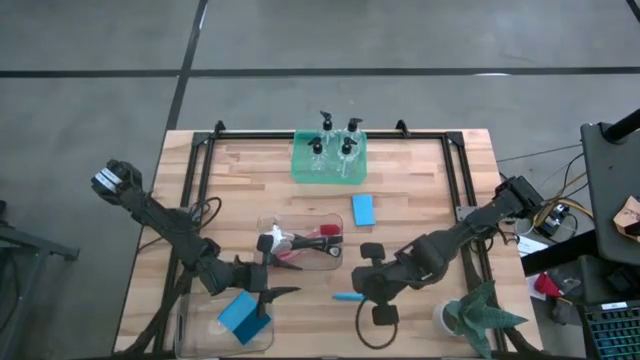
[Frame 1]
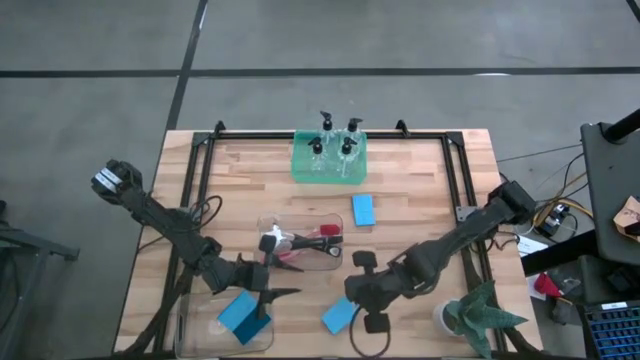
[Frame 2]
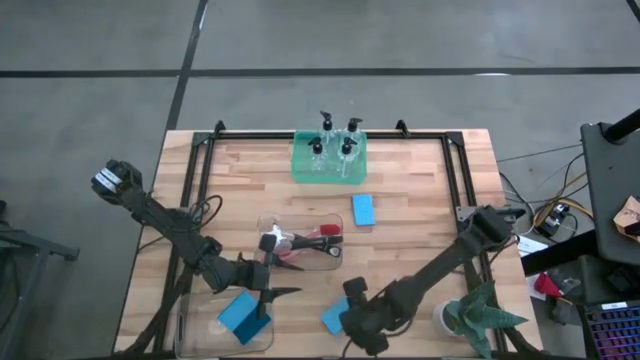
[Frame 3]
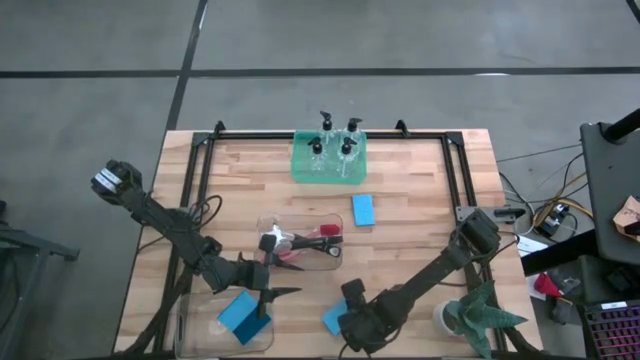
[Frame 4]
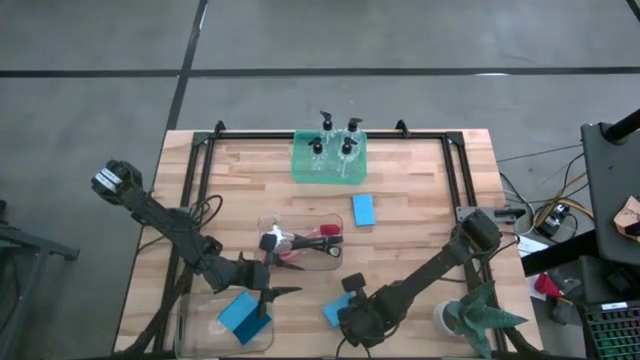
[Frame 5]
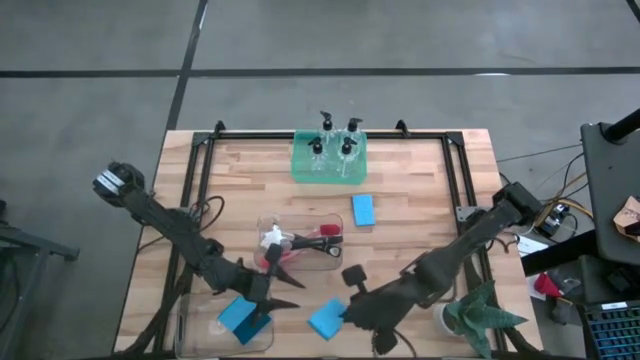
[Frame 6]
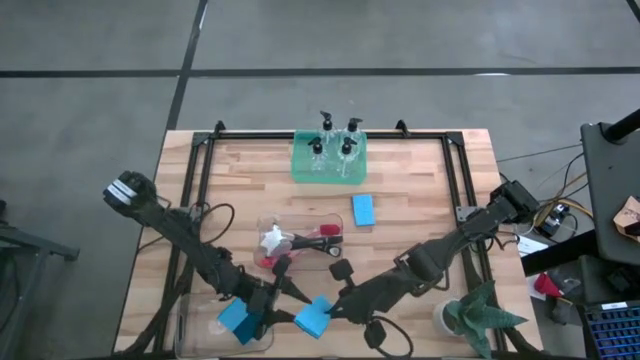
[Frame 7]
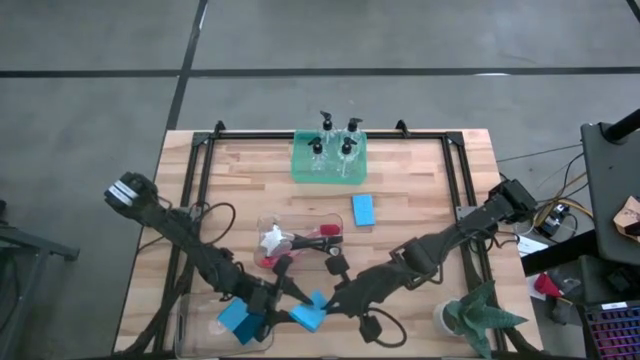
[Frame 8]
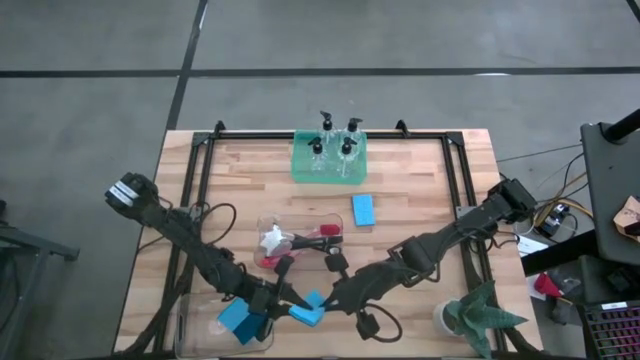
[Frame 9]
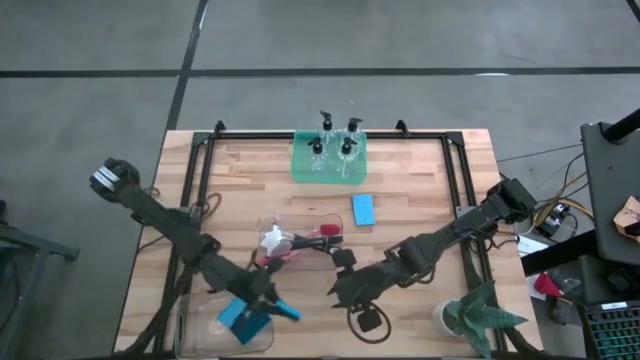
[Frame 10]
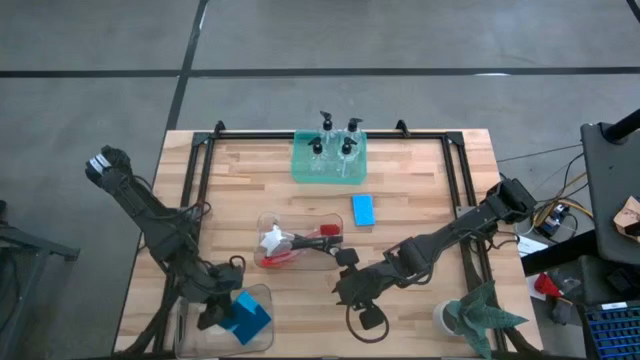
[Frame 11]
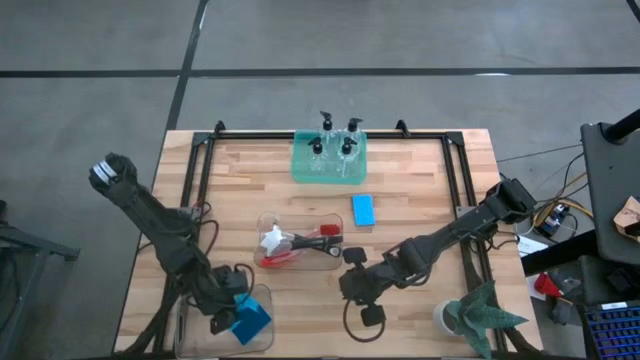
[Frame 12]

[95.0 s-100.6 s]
Task: Pick & Place Kitchen Sink Supplies
Put the blue sponge into the bottom transparent bin

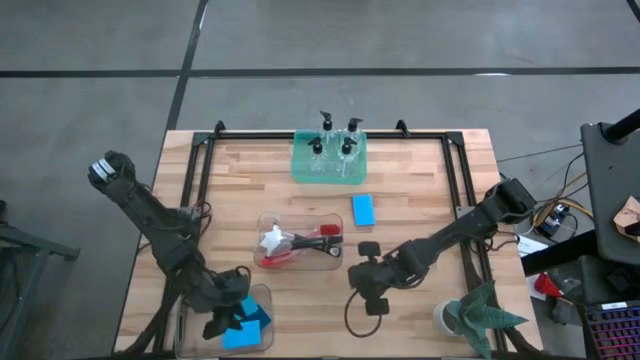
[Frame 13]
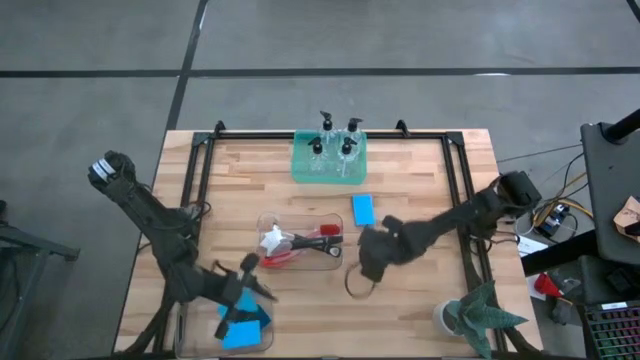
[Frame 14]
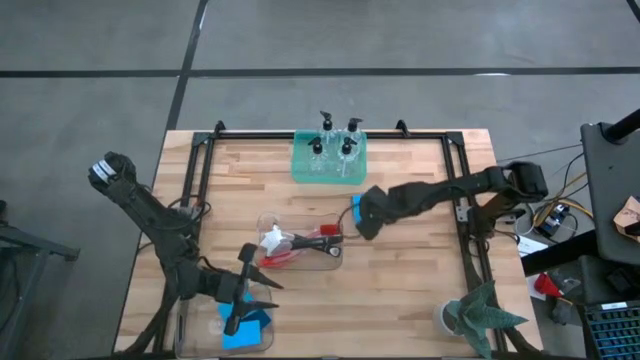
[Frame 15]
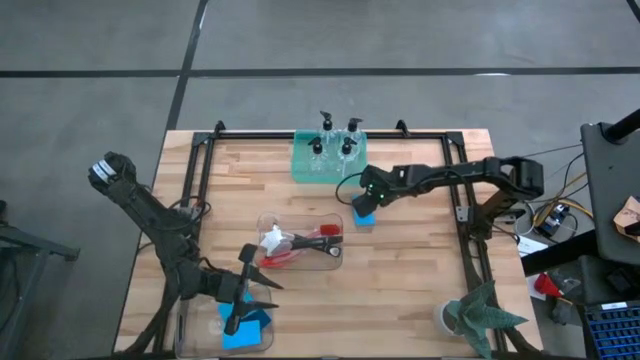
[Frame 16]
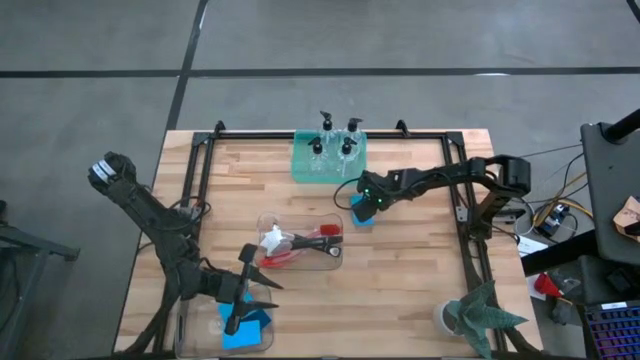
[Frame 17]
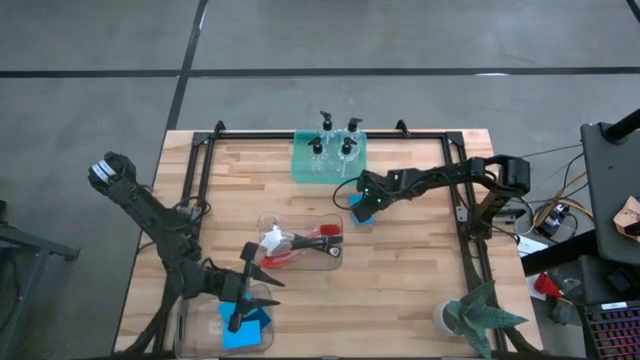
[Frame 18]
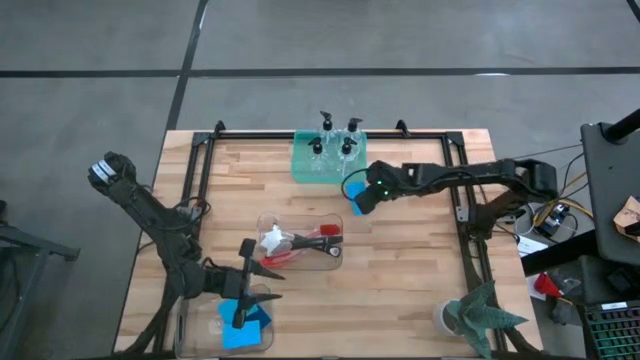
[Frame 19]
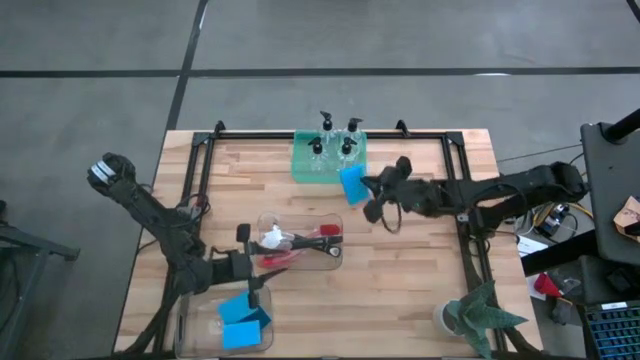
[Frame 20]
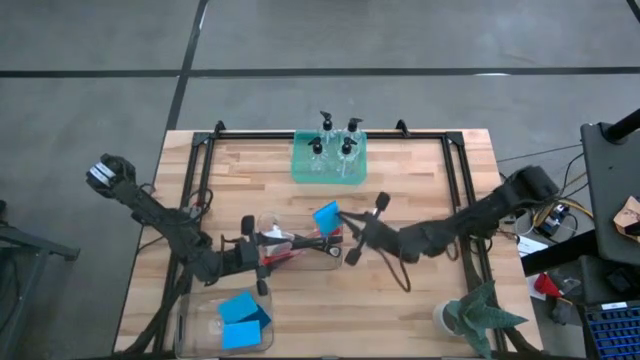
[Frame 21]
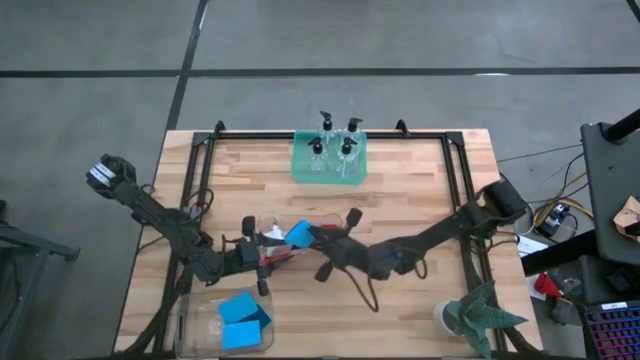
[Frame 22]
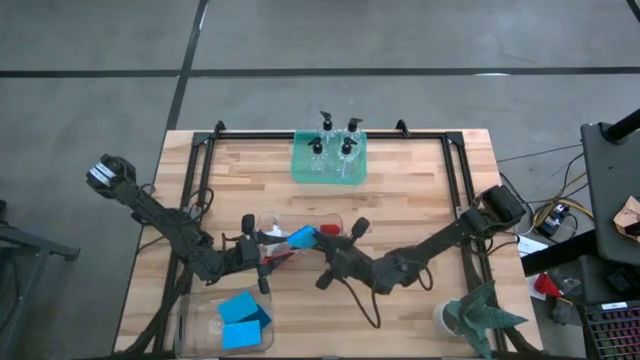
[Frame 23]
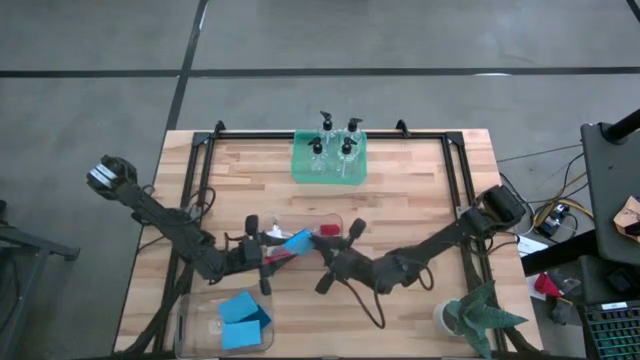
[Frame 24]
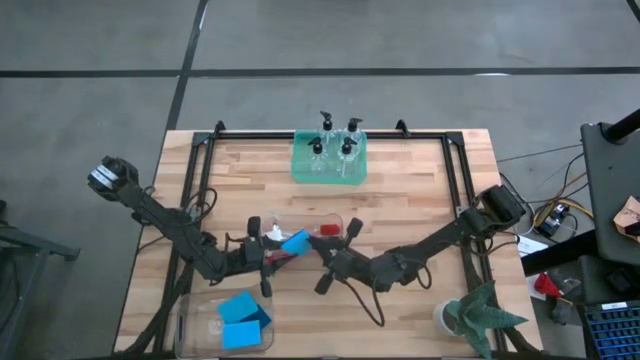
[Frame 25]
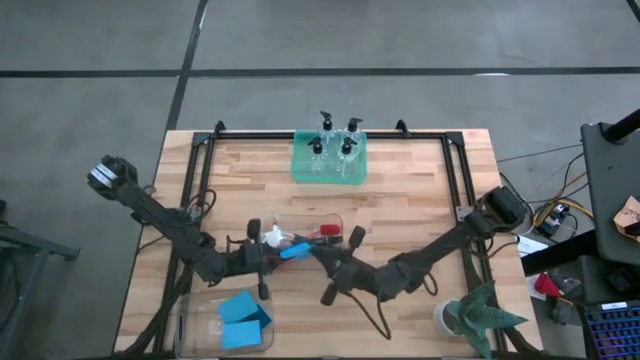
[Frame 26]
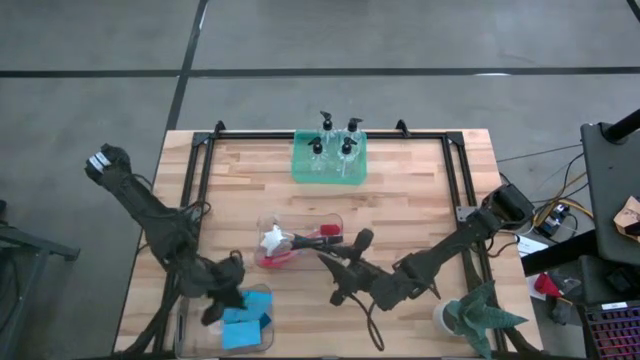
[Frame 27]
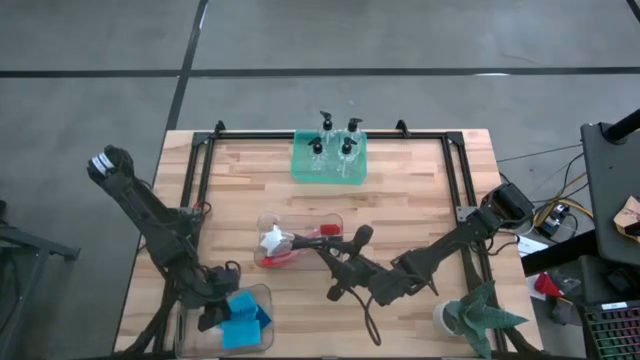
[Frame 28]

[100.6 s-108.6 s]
Put the blue sponge into the bottom transparent bin

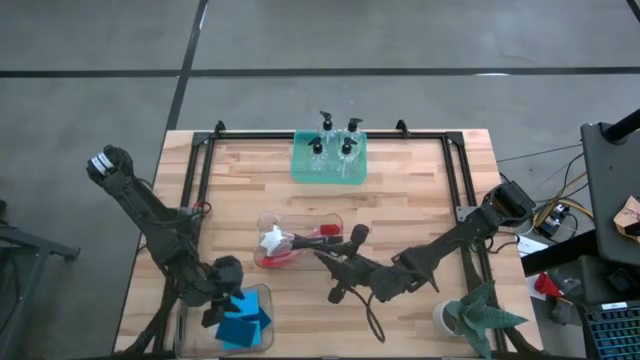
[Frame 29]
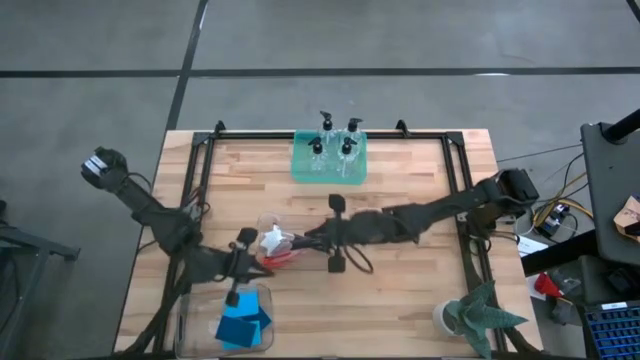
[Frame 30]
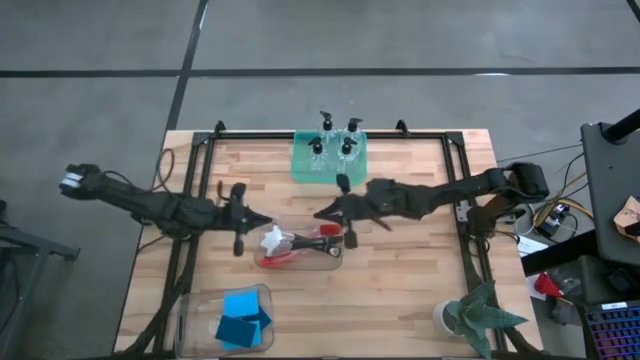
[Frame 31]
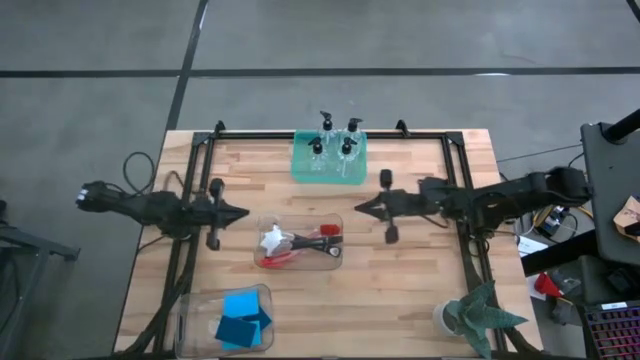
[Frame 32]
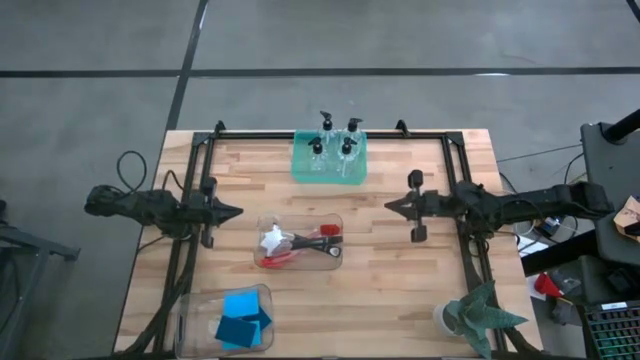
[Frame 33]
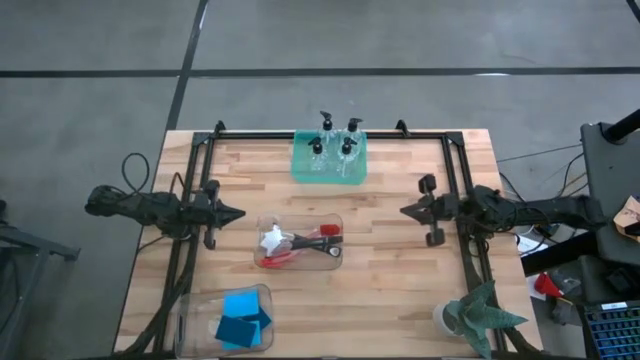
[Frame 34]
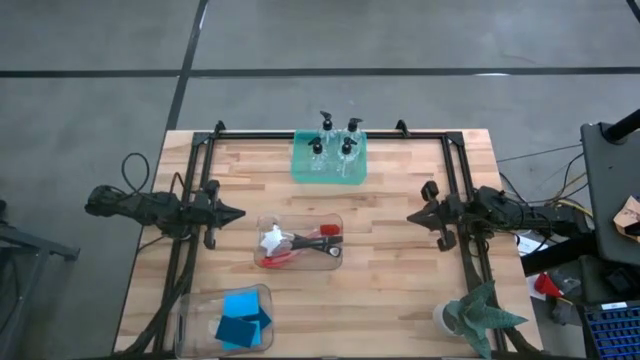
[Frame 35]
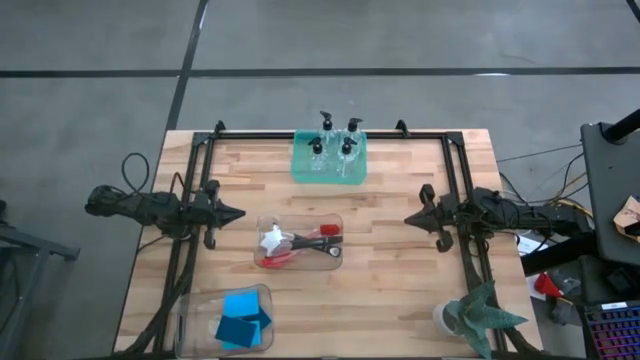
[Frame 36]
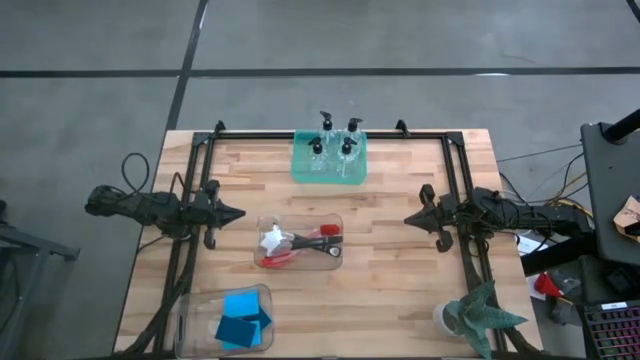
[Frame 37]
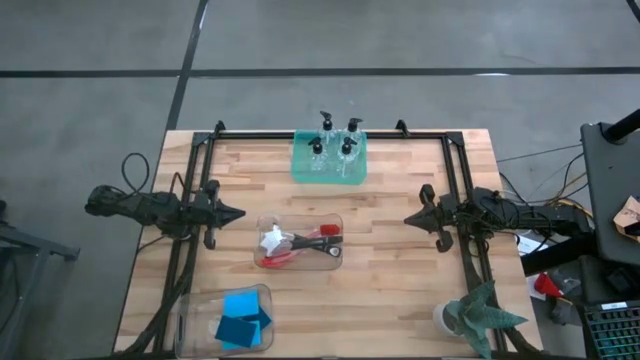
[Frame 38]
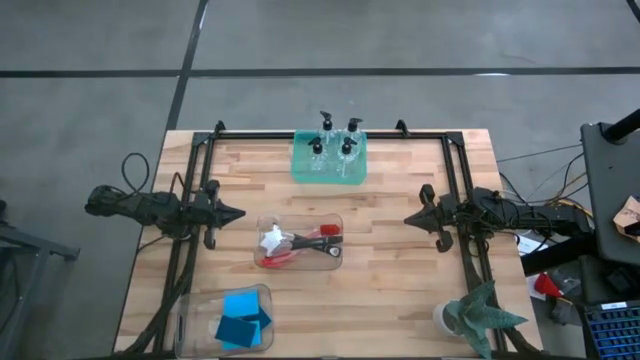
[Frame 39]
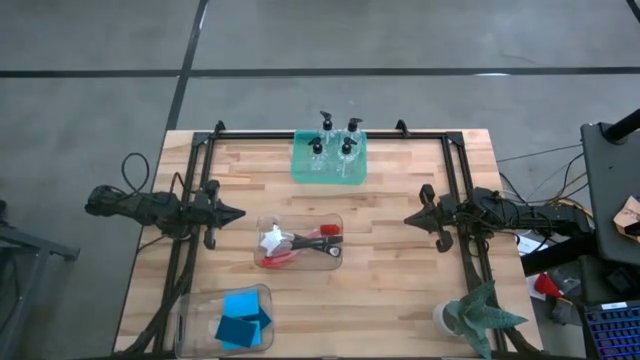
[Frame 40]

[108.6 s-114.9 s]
Return to Home Position

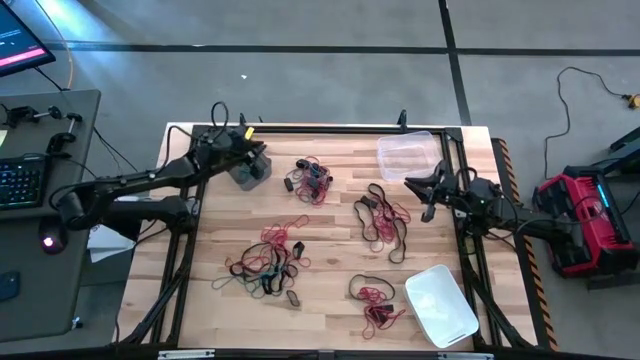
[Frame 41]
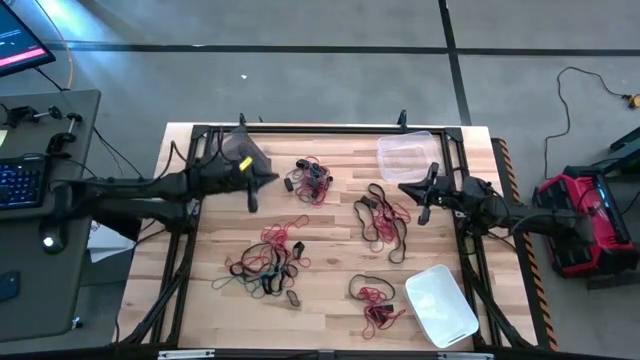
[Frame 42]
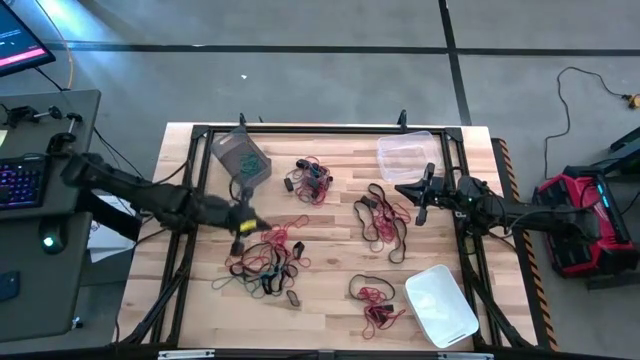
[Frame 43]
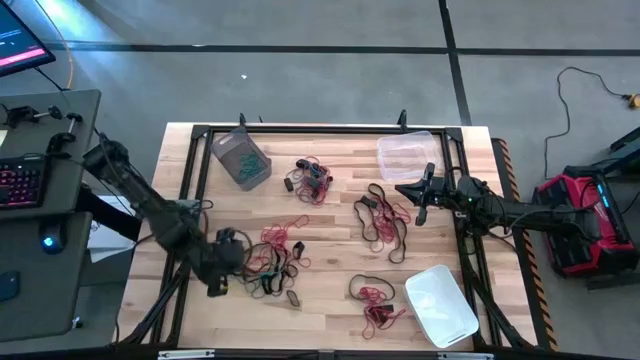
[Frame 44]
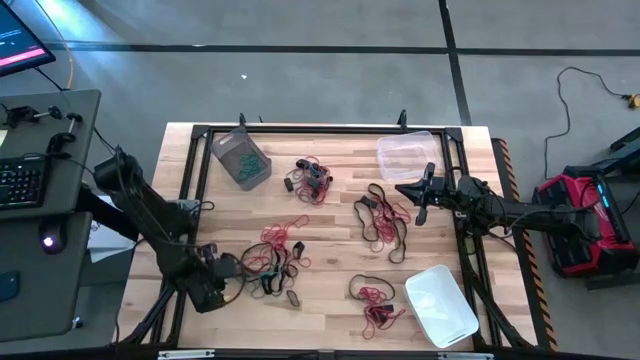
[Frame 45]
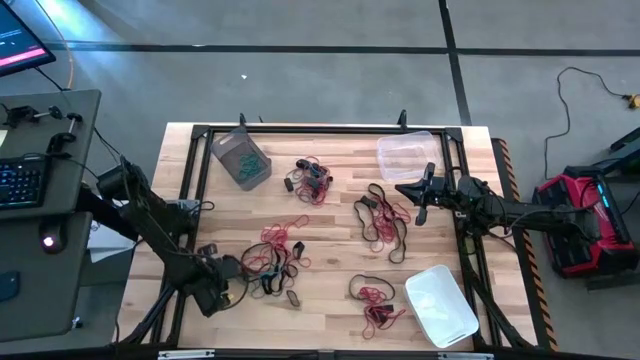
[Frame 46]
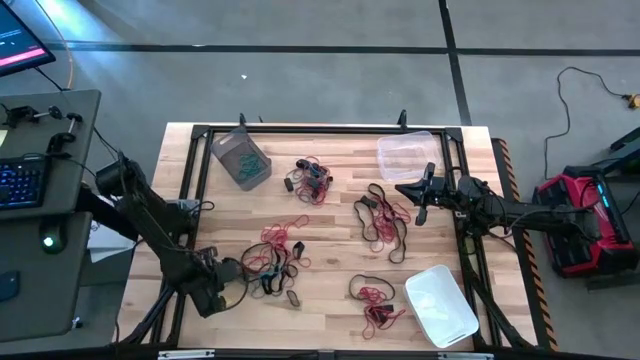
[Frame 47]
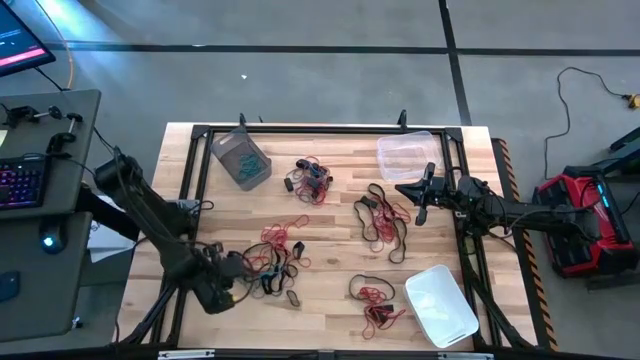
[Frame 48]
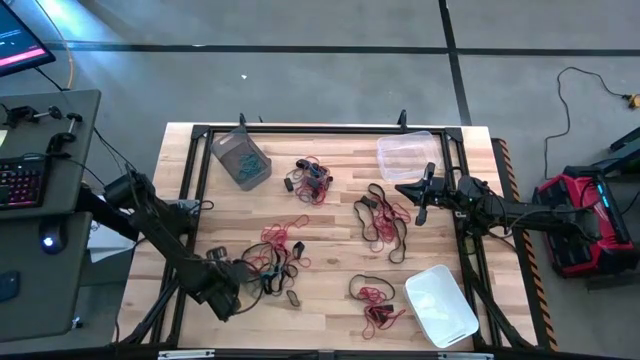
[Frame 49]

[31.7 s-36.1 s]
Task: Sort rubber bands into baskets
Put the blue rubber band into the black bin
